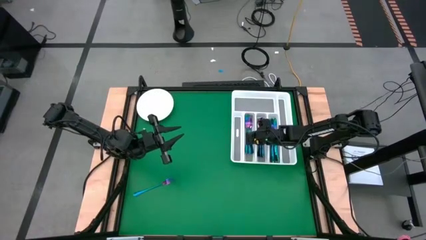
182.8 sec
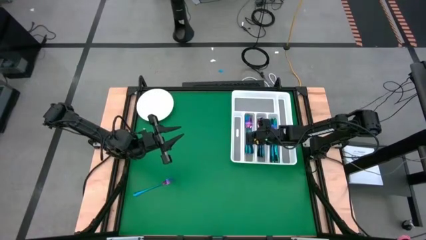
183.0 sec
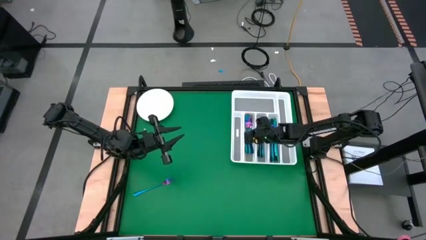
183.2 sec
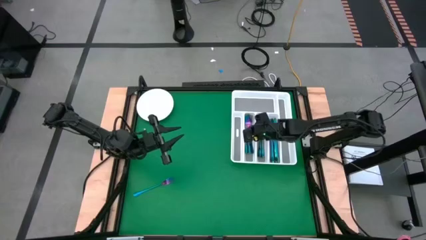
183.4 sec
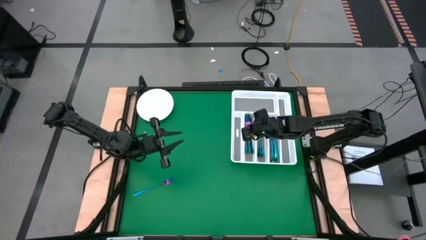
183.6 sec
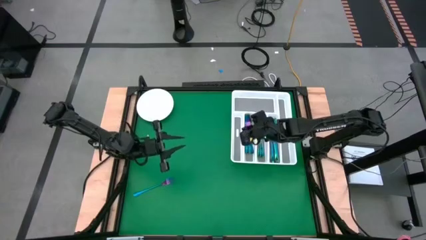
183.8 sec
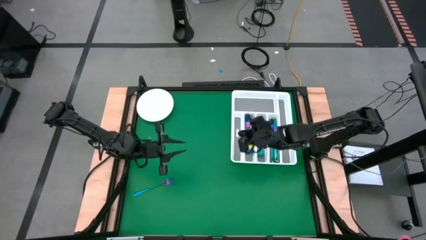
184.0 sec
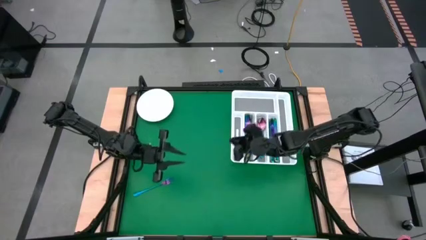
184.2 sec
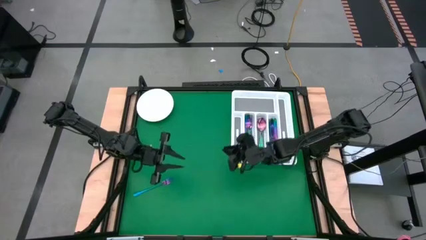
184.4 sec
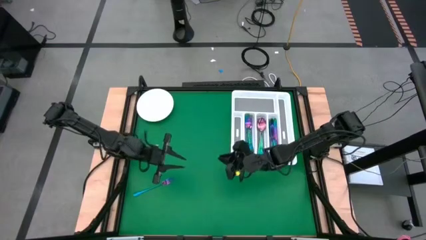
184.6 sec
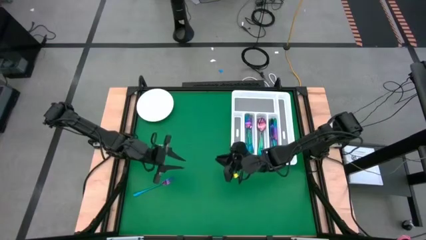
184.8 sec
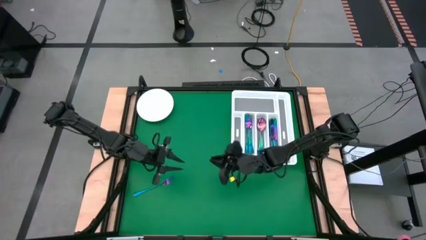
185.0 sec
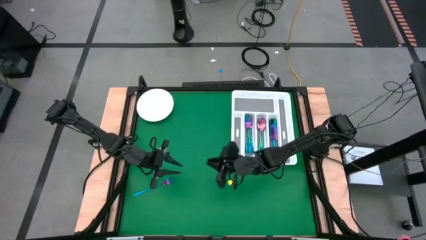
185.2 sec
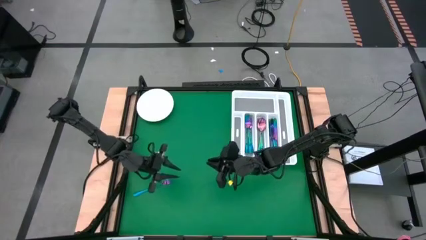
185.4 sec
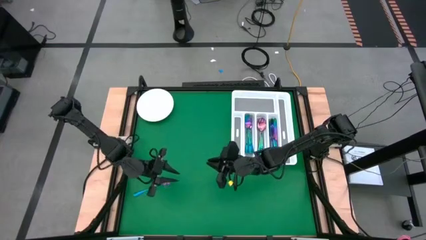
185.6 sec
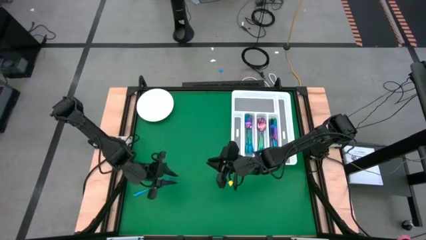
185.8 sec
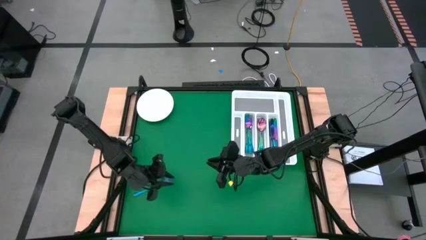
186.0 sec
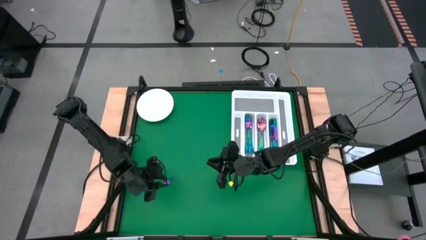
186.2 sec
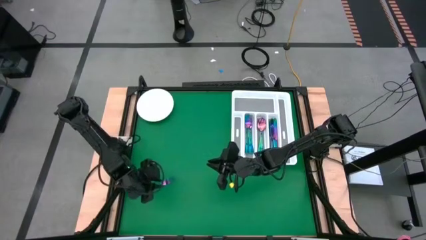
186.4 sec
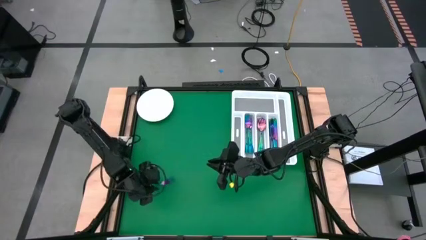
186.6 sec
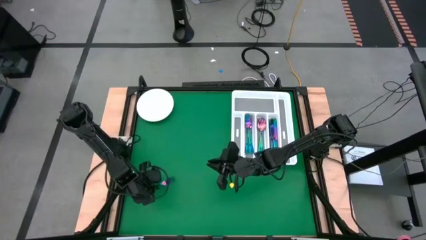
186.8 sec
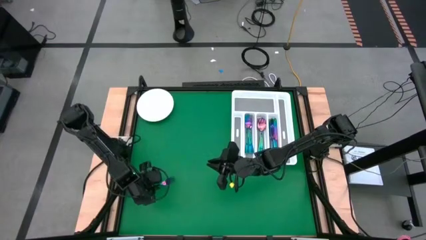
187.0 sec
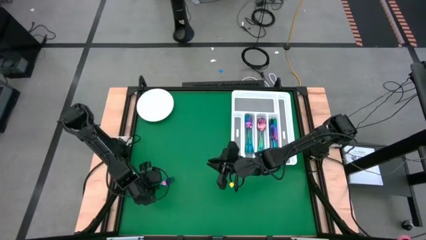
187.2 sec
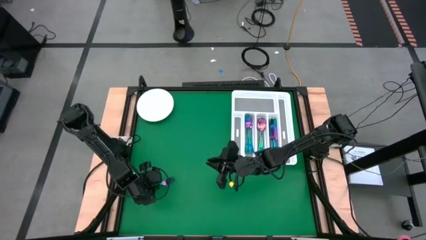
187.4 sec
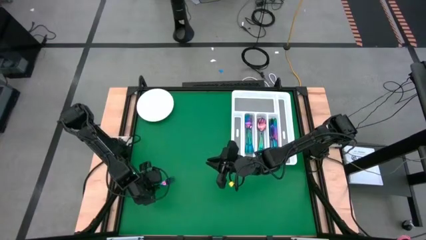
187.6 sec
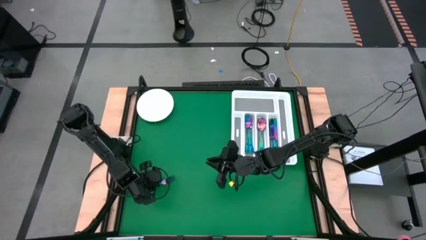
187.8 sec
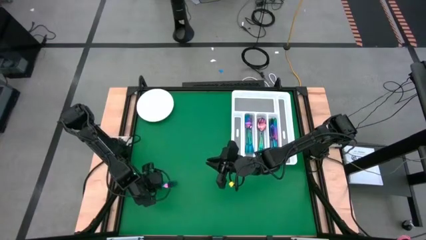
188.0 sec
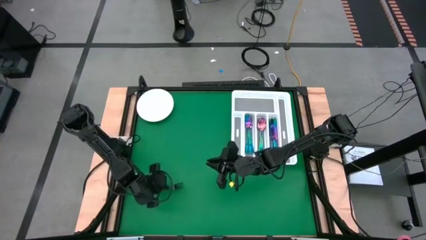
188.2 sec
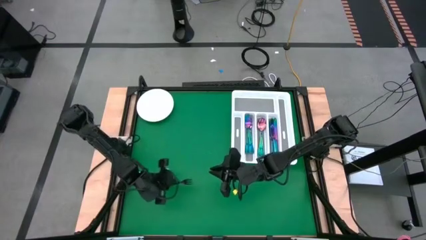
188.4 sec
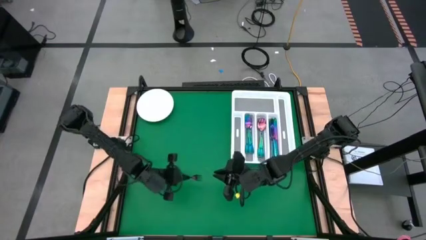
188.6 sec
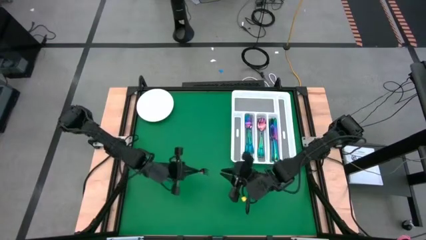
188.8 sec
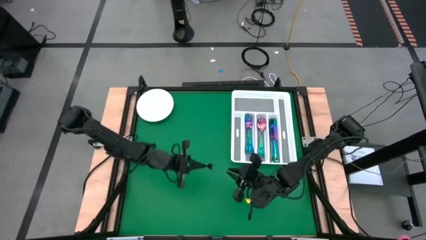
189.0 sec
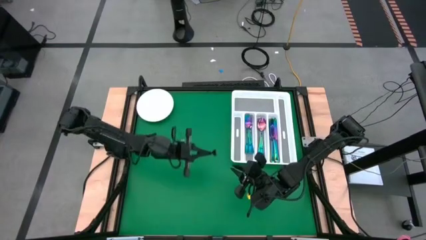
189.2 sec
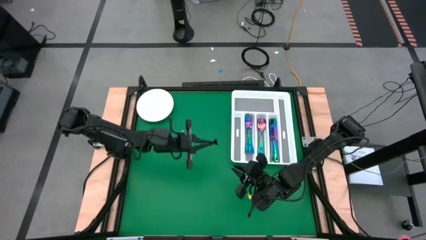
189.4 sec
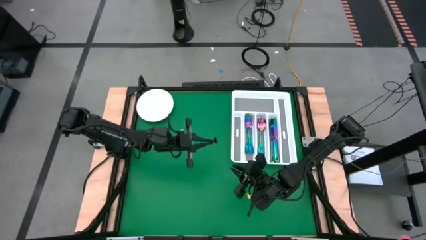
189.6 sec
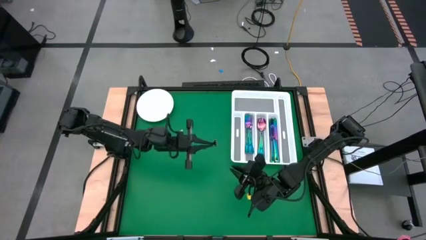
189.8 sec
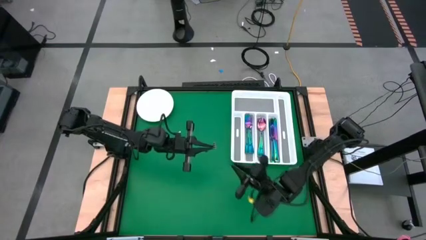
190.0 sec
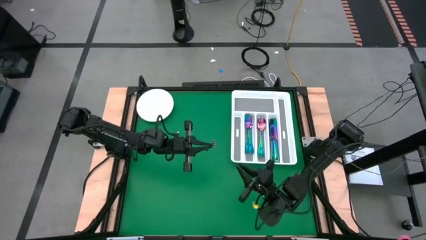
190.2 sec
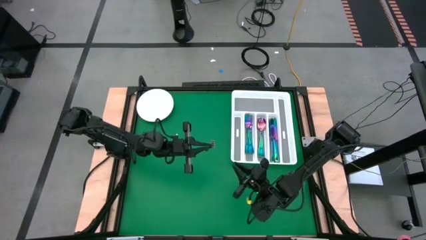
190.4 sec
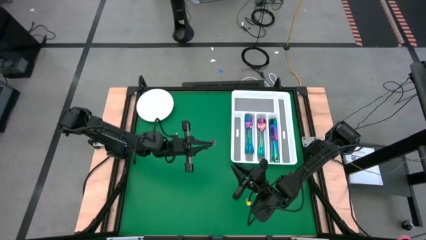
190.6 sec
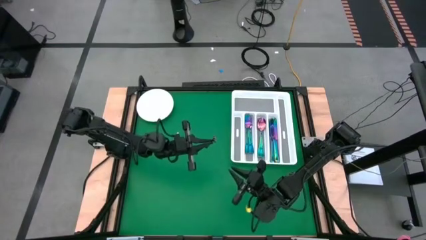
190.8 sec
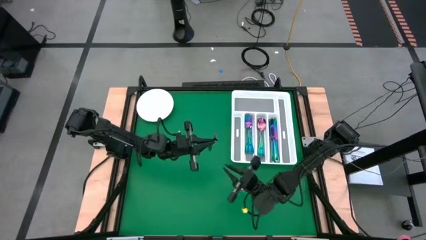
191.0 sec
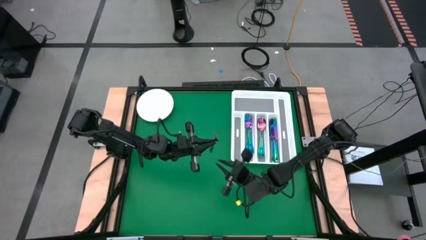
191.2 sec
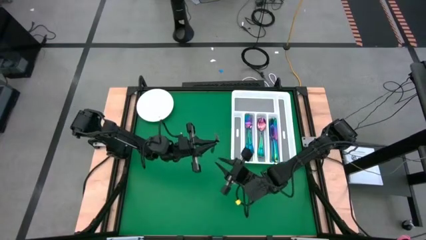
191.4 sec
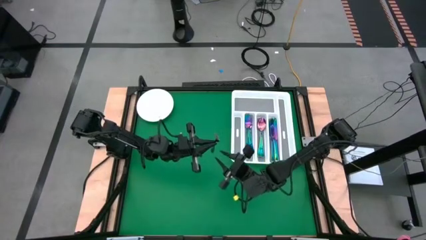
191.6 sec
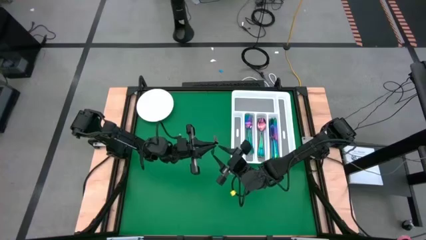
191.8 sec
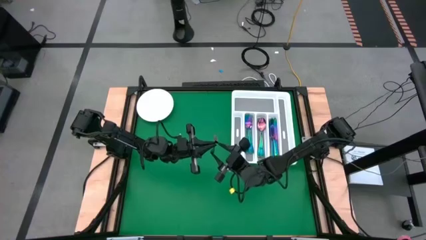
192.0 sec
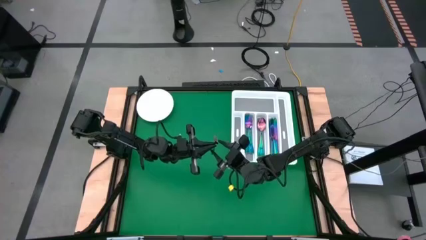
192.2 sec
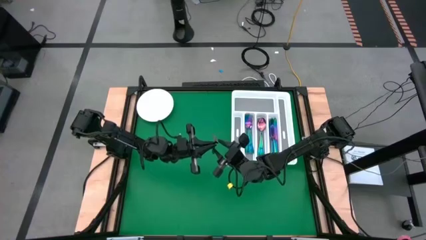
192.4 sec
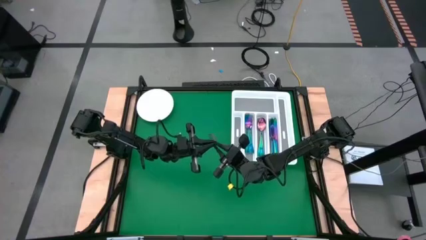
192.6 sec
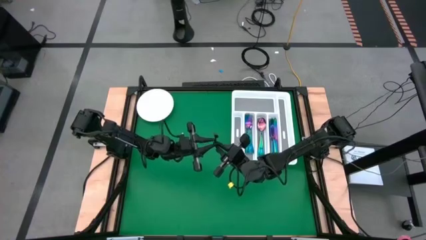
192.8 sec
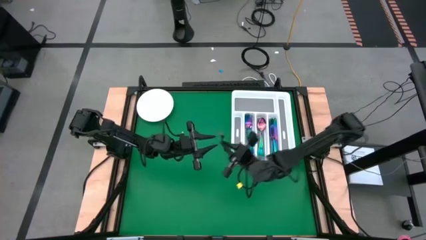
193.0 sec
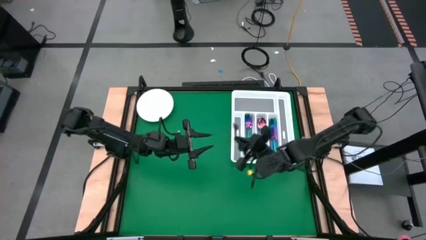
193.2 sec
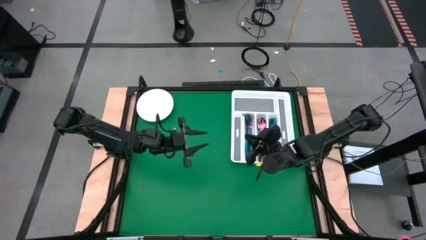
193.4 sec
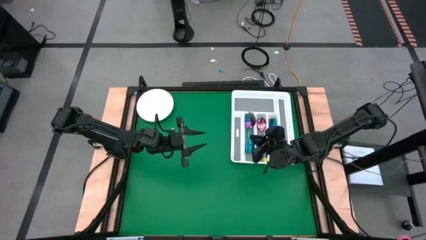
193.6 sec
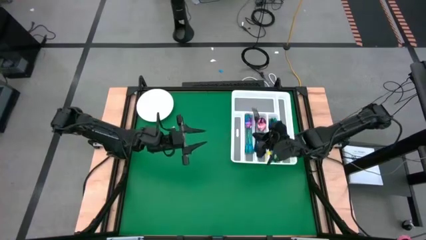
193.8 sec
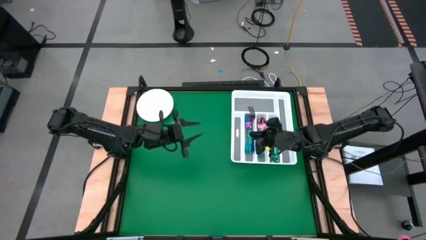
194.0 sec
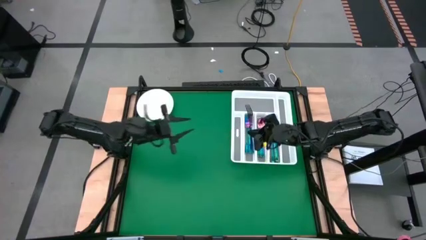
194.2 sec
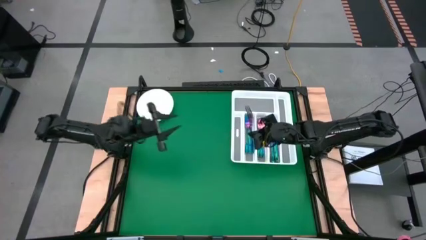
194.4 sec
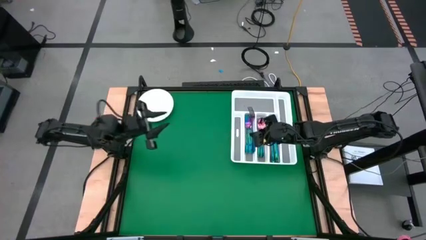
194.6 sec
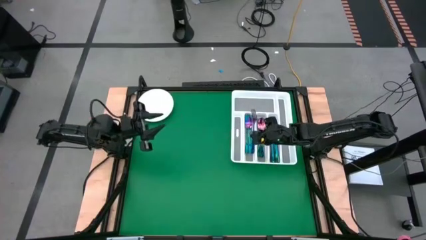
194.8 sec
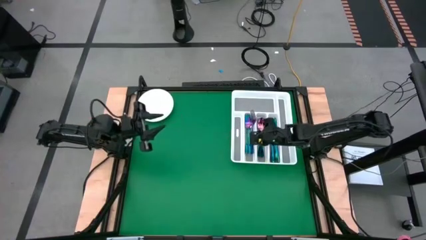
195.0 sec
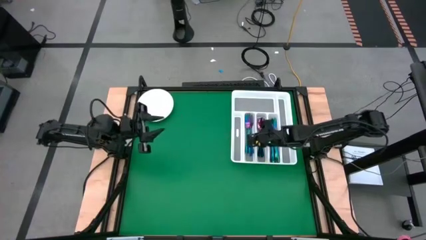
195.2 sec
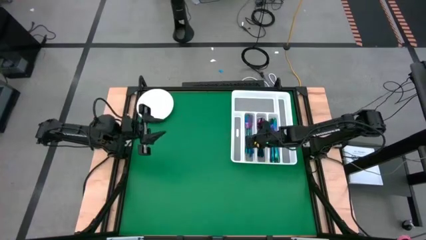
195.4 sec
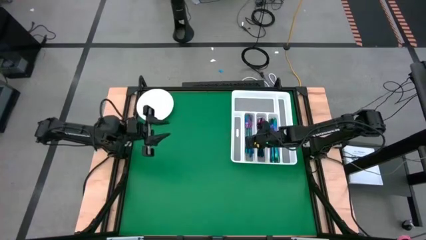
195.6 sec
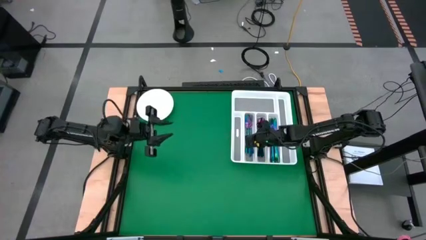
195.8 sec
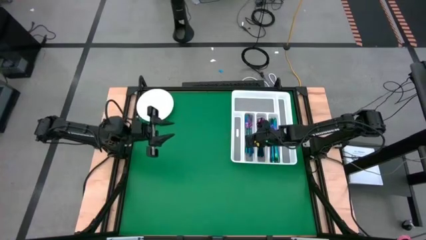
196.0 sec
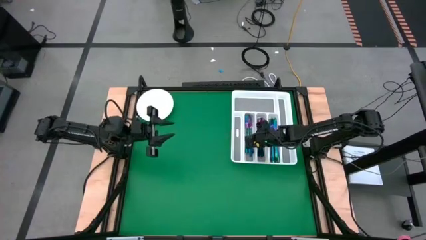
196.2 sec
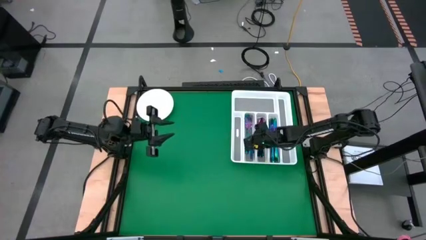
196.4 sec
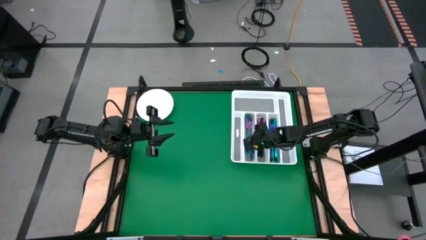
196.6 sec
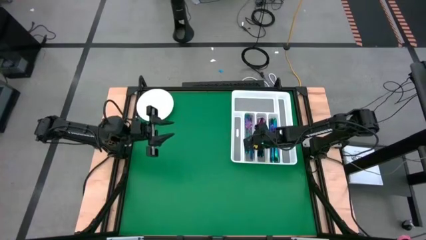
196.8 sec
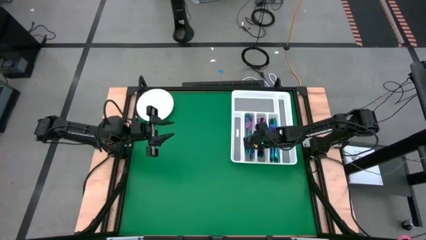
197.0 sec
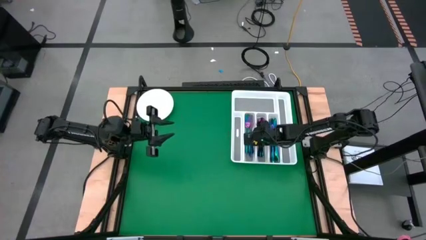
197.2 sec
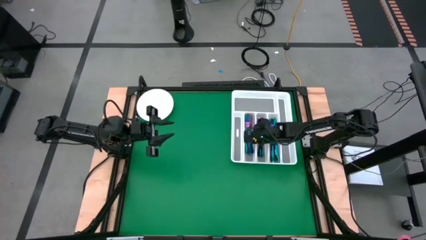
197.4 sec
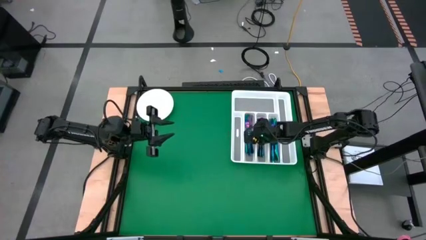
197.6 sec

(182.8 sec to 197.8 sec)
Task: Sort silverware
Put the blue fork into the white cutlery tray

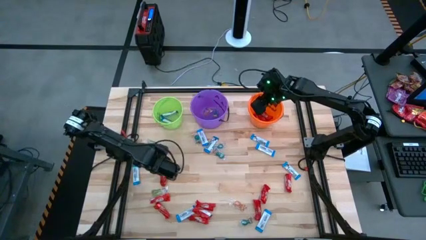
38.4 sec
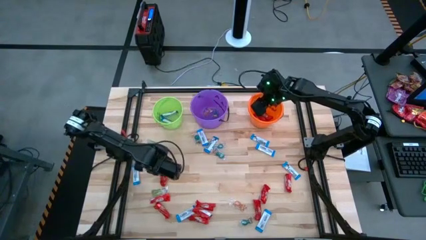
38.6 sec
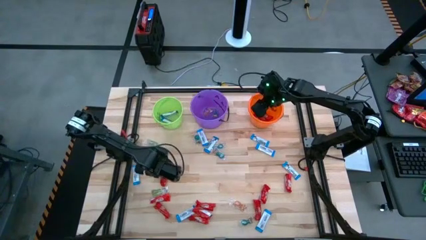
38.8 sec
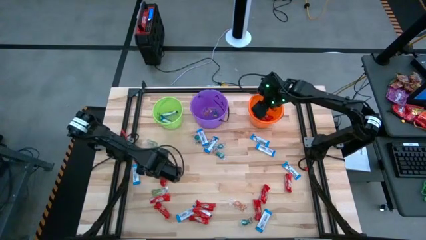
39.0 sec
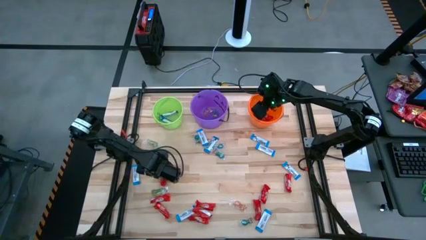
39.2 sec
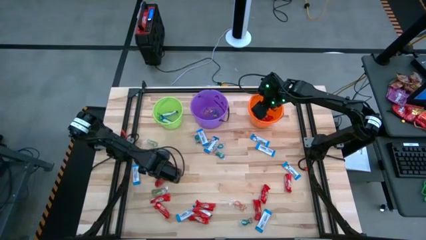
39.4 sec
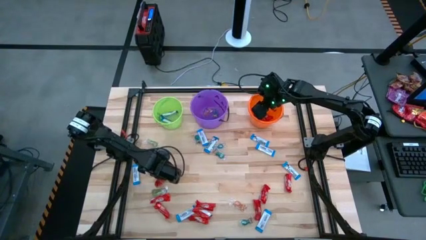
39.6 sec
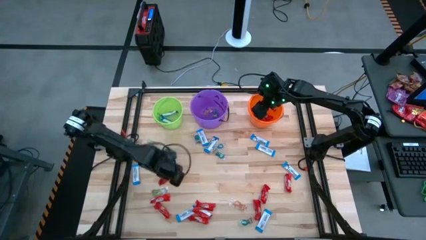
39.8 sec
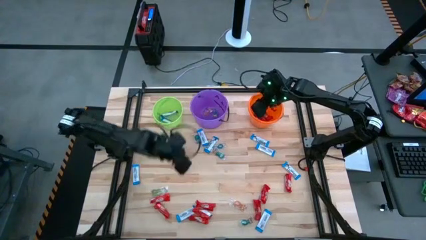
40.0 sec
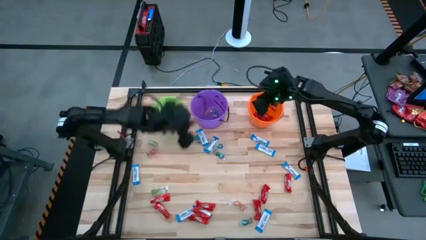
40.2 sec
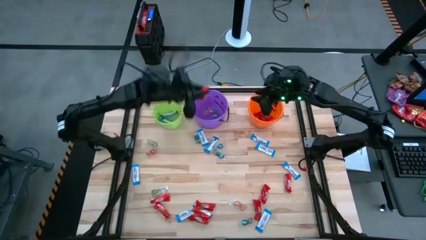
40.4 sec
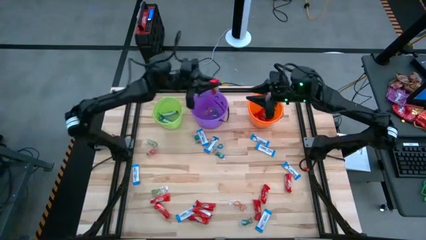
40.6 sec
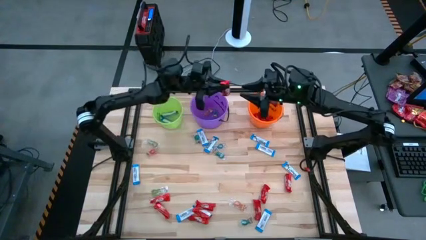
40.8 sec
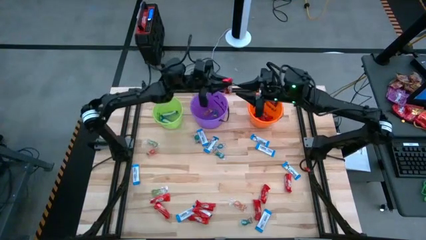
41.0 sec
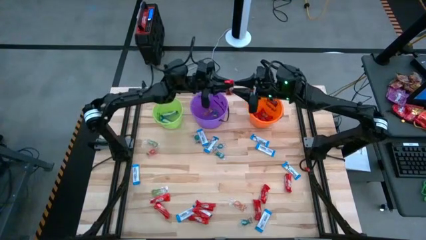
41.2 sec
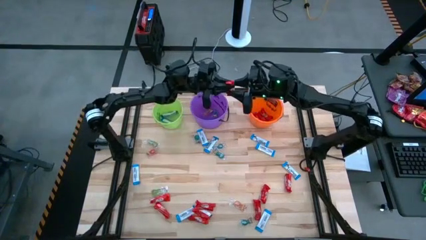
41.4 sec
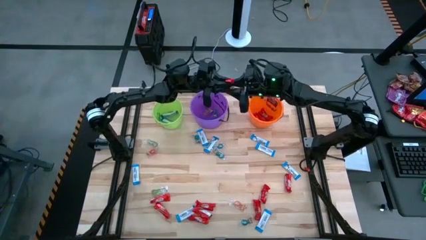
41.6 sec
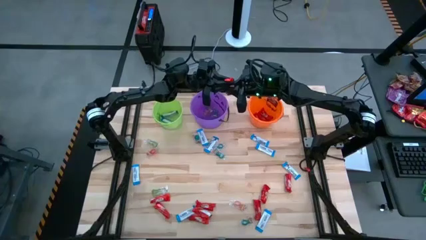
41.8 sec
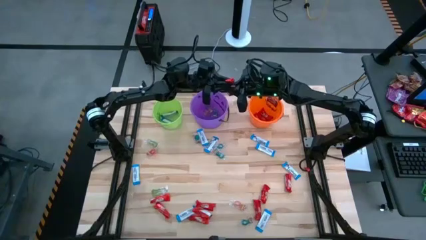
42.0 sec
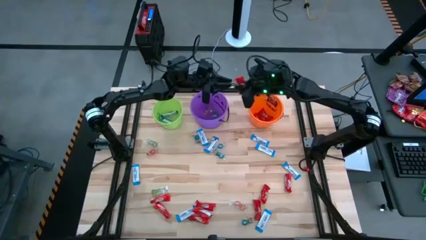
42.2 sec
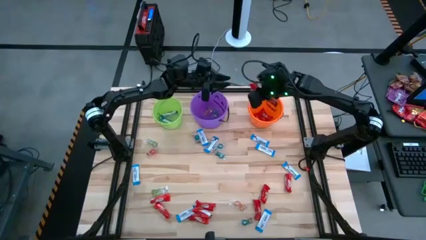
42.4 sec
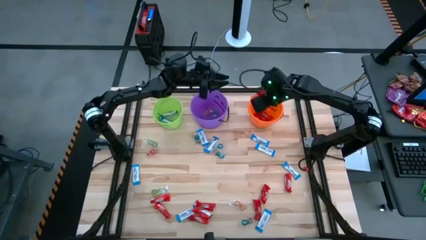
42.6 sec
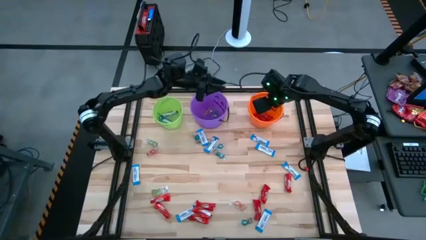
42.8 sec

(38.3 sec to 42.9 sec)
Task: Sort candy by brand, put in halloween buckets
Put the red chocolate into the orange bucket
